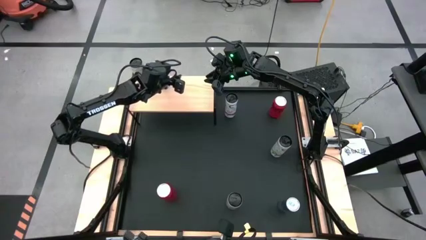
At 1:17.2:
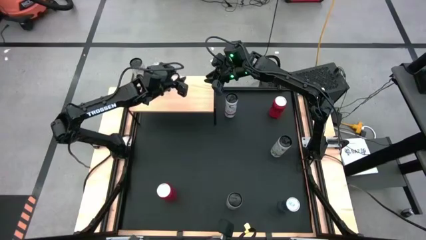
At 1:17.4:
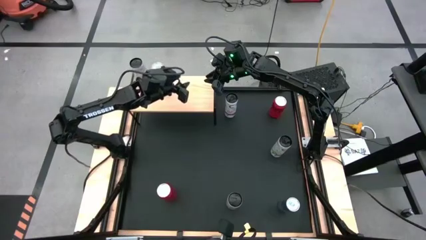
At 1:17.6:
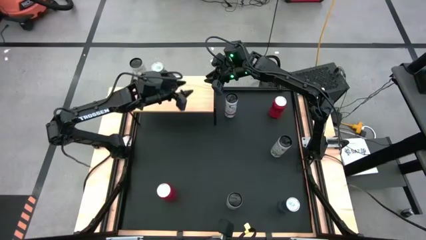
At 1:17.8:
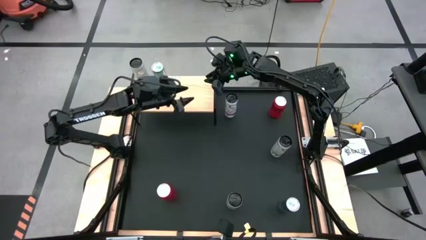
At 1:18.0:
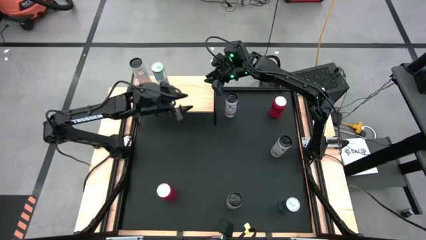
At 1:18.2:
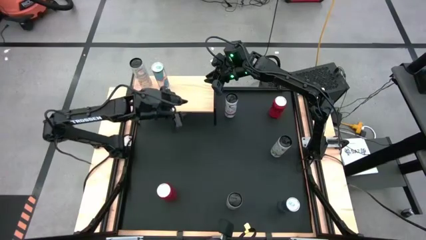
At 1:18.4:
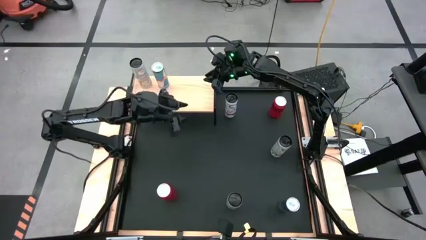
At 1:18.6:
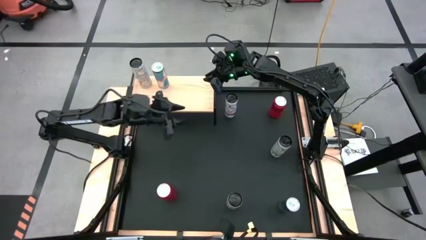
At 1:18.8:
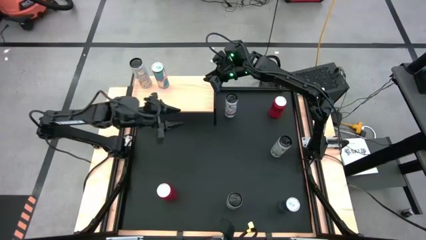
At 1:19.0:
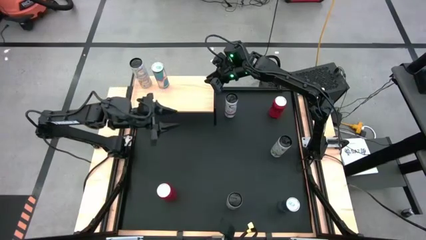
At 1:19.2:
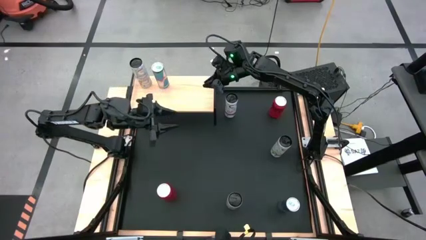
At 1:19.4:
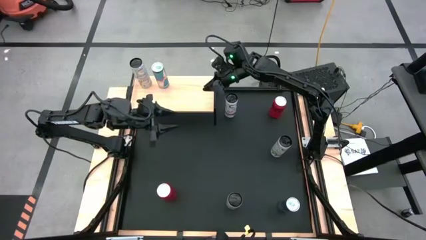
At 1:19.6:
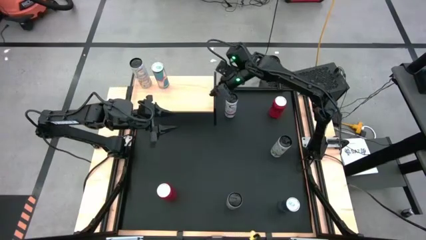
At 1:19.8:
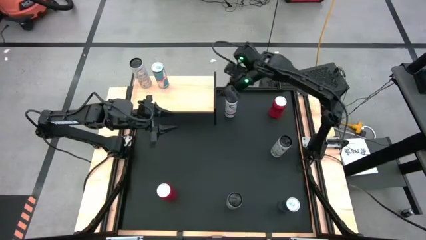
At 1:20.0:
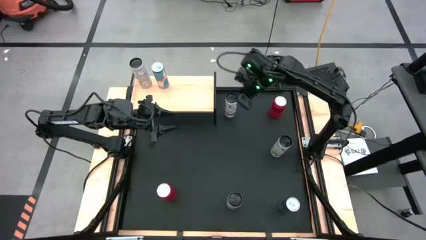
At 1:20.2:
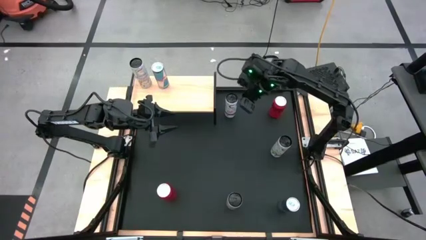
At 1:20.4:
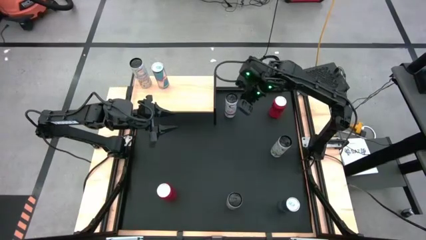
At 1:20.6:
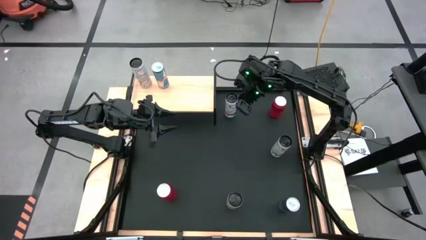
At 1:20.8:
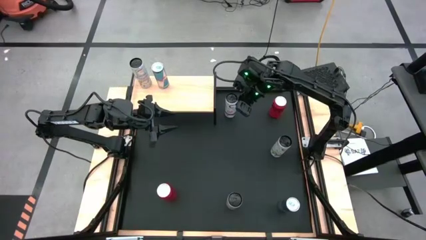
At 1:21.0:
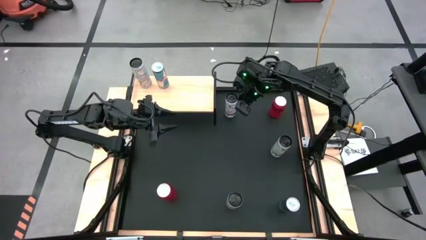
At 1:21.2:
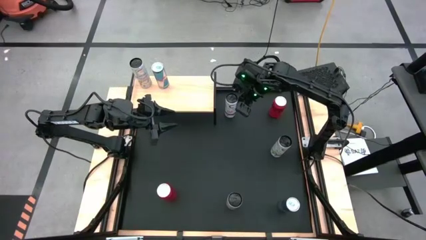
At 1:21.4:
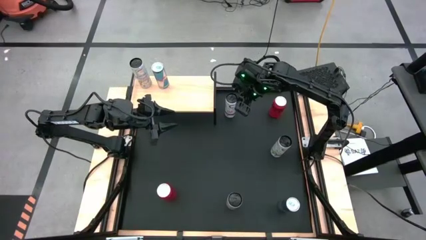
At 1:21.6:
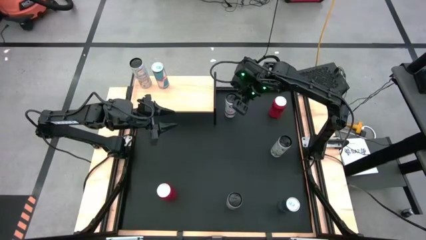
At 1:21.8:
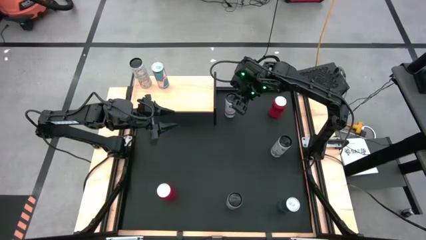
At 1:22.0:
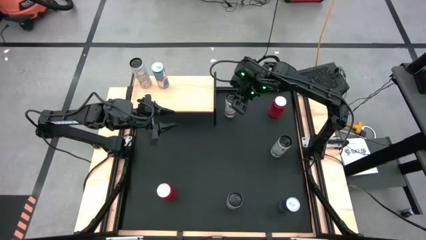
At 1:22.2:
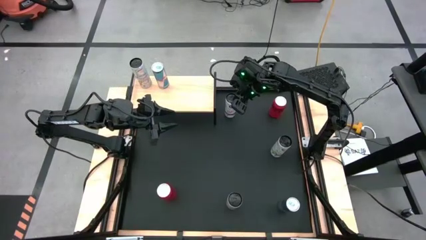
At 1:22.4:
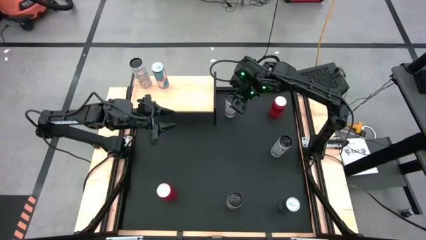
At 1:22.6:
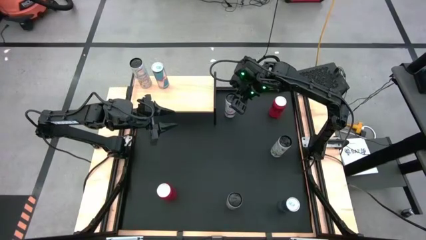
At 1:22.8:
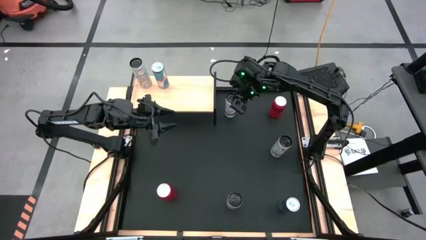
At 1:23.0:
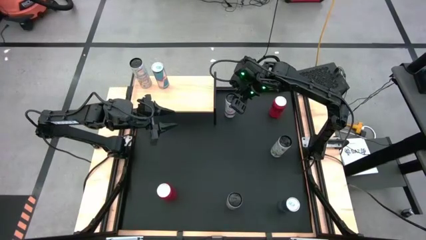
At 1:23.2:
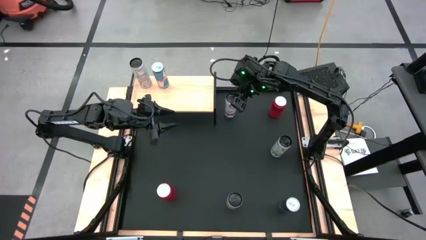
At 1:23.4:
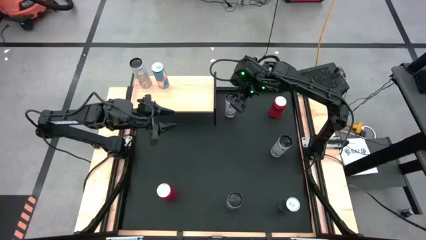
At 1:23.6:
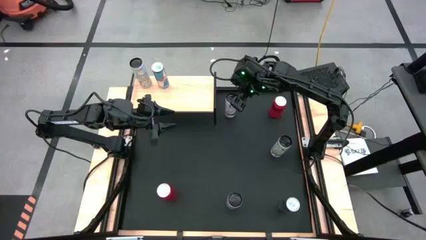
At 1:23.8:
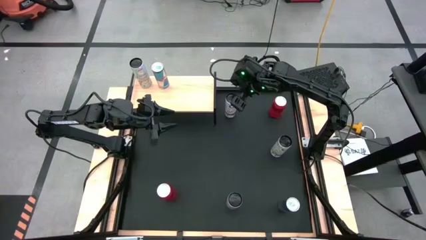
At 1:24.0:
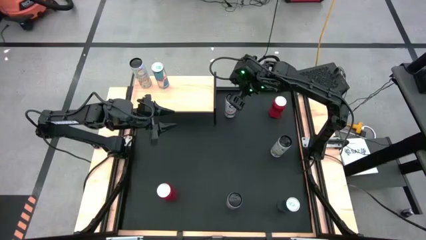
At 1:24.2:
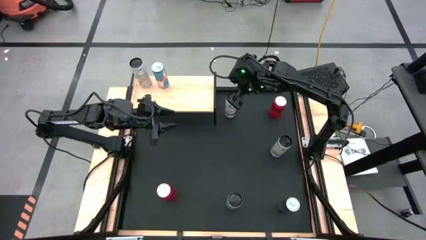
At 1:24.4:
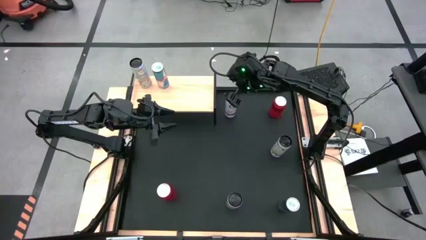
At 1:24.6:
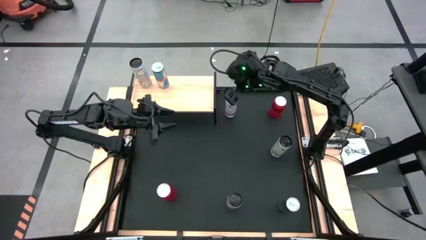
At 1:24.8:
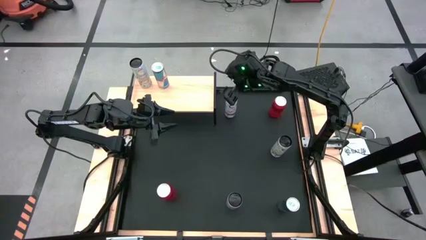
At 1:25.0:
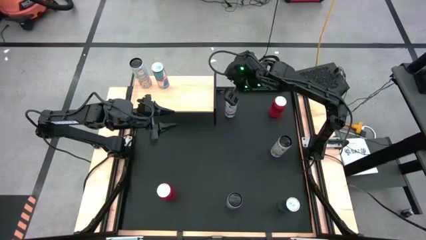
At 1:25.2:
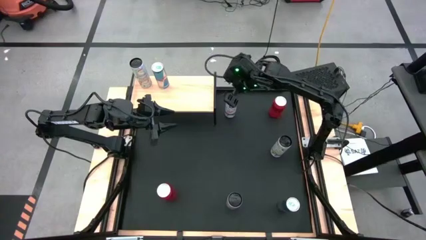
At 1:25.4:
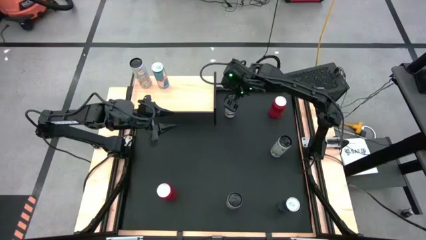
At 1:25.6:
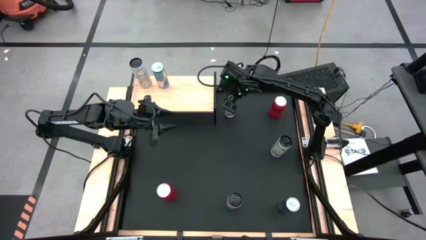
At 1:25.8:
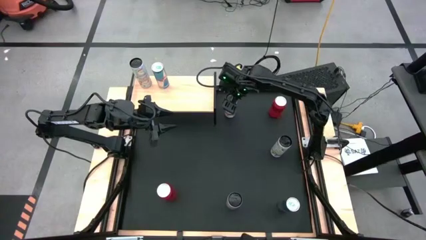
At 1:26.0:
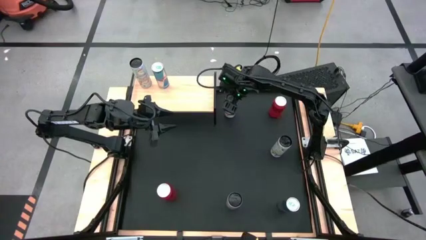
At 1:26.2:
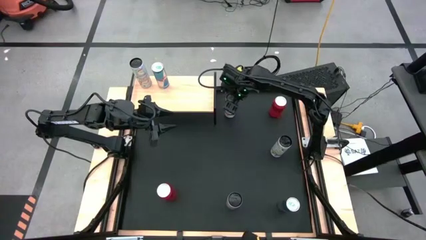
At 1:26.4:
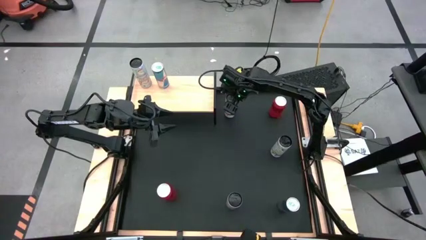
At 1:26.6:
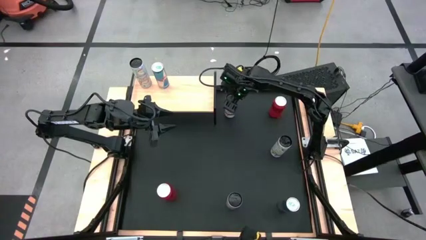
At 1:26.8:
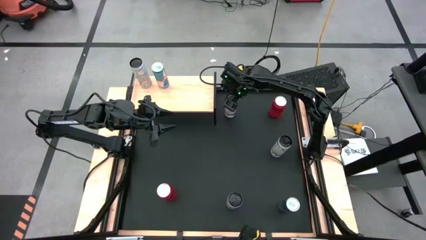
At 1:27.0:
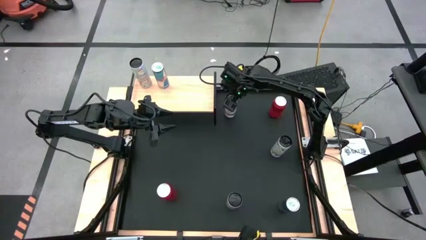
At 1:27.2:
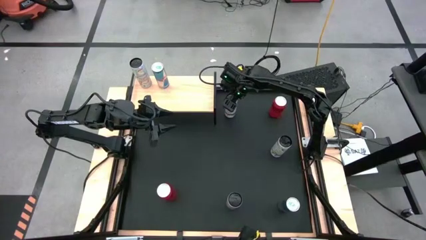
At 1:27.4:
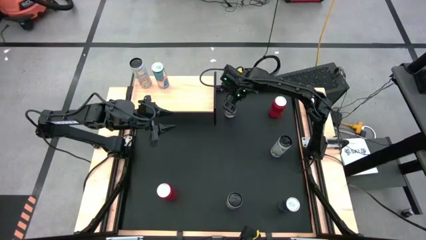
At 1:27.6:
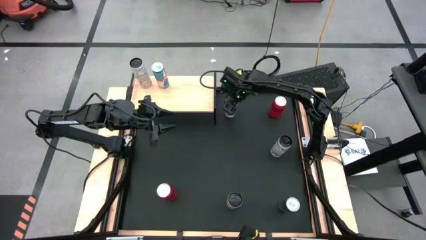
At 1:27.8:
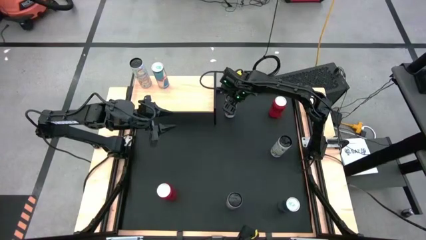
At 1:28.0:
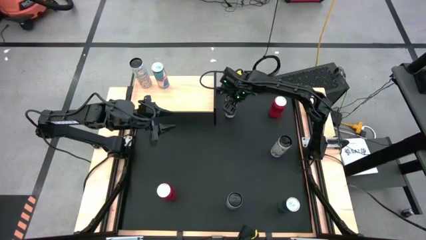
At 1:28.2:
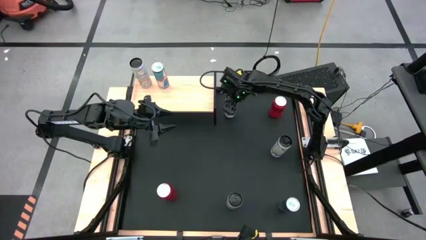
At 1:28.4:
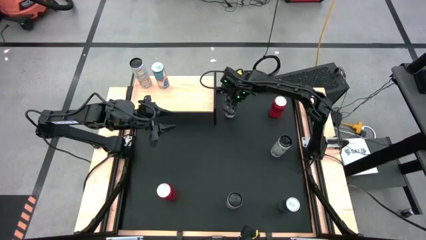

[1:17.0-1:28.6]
Task: Place canned beverage on shelf
Put the top white pink soda can on the shelf

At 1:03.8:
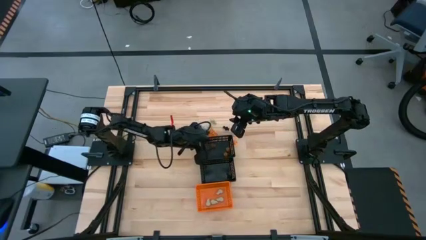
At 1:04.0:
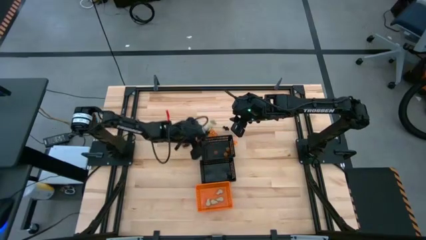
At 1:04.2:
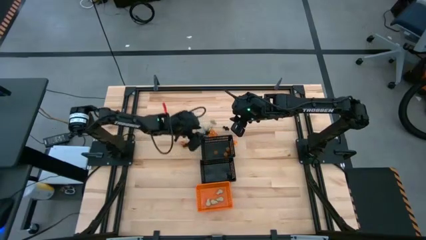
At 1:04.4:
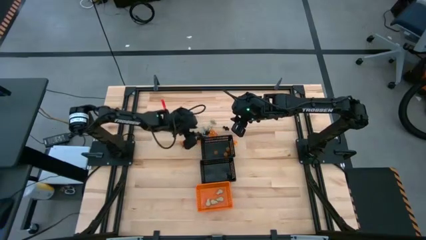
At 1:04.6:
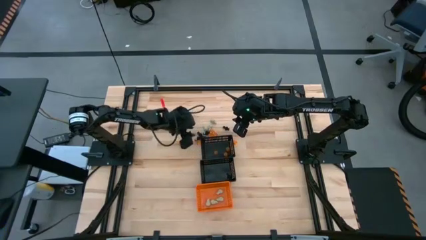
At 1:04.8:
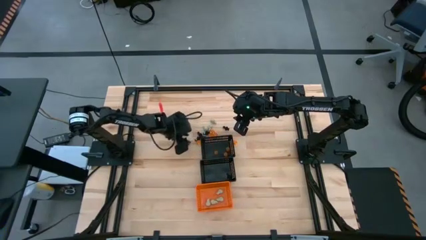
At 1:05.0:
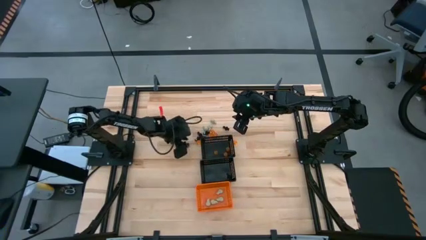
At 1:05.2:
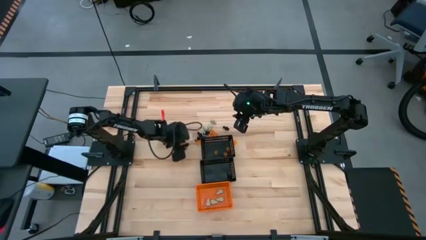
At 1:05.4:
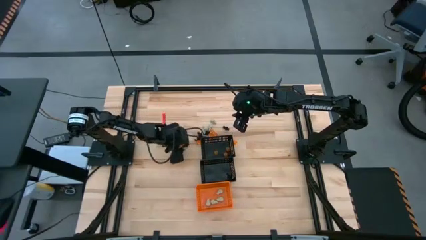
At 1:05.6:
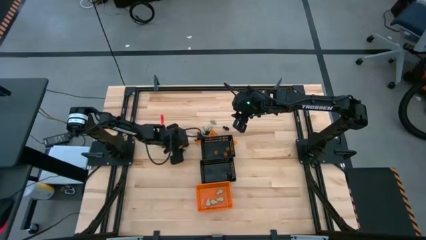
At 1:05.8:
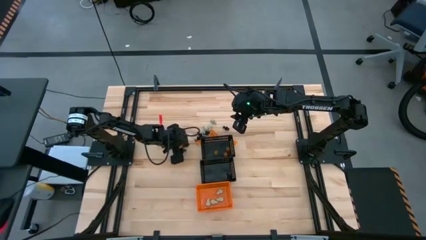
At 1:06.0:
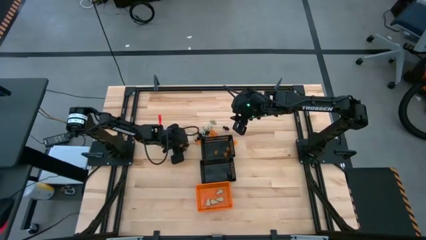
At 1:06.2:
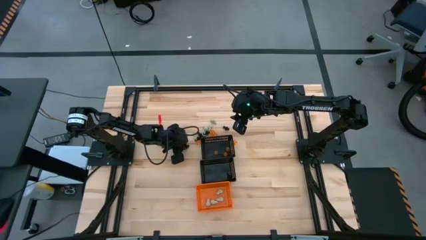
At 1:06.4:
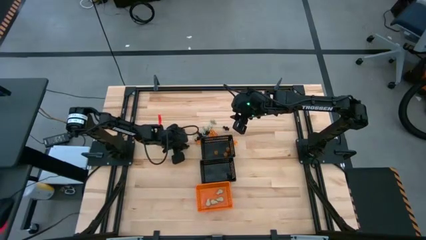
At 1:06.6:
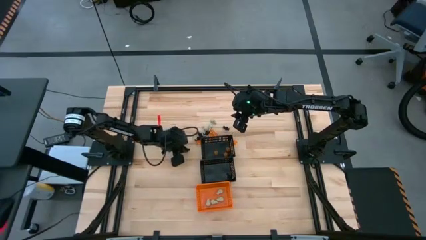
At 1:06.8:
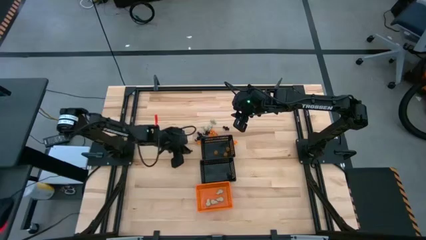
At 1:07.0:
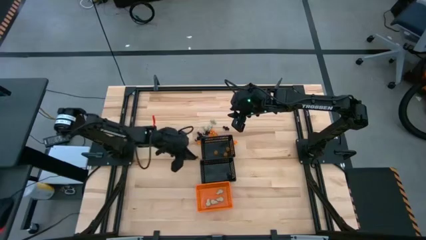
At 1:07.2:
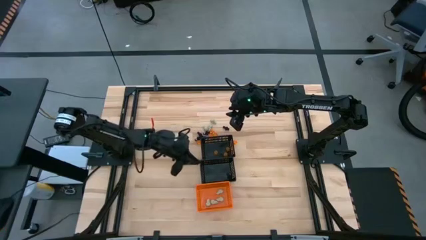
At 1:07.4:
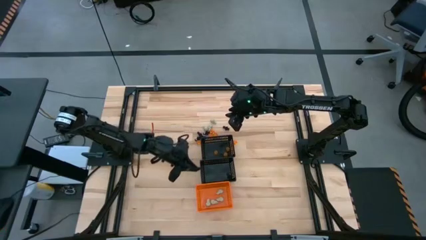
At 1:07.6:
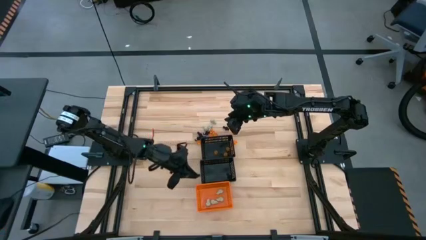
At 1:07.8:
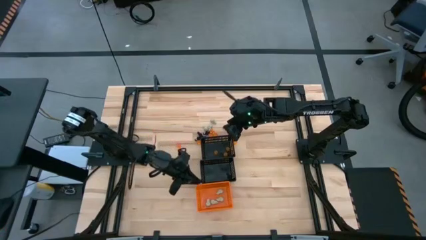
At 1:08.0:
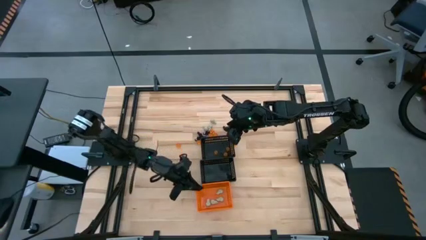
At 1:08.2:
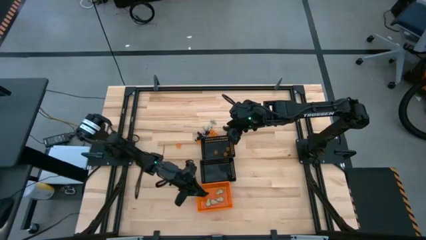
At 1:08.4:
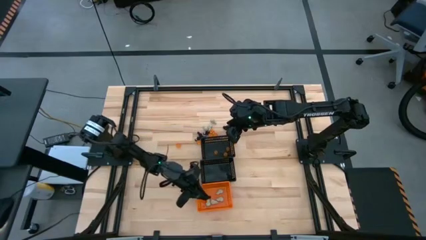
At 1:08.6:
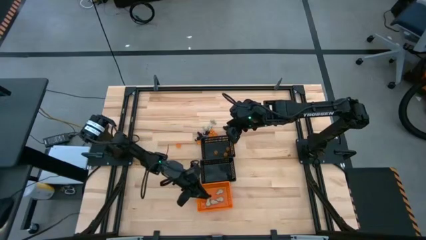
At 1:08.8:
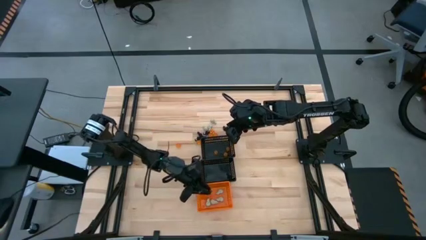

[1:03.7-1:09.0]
Task: Sort Halloween decoration
Put the black skeleton toy into the bottom black bin
